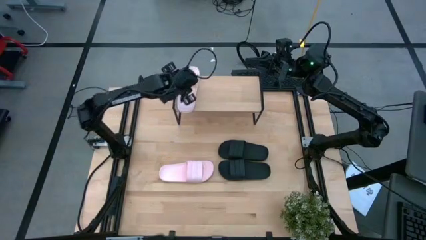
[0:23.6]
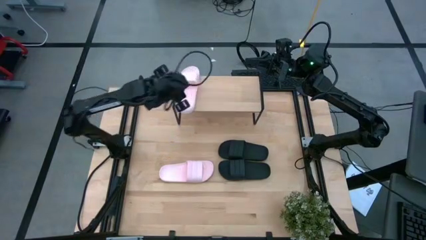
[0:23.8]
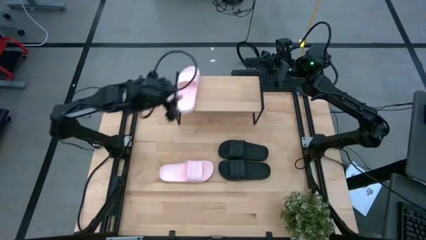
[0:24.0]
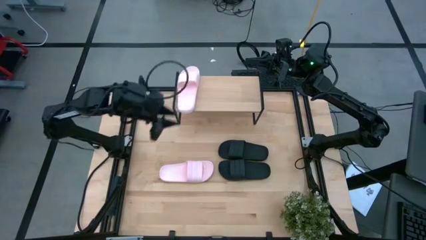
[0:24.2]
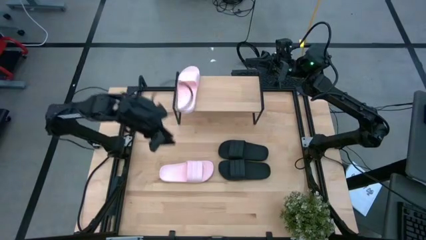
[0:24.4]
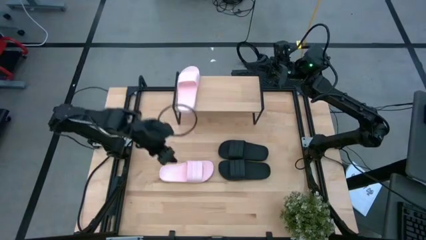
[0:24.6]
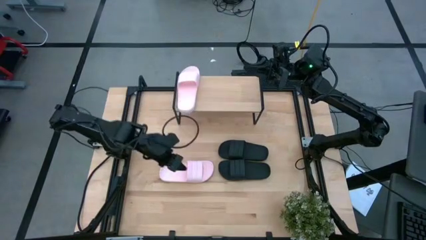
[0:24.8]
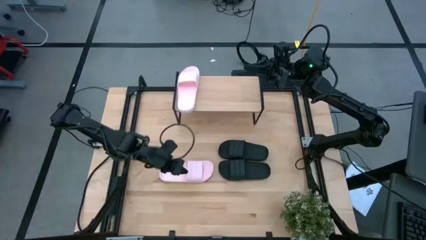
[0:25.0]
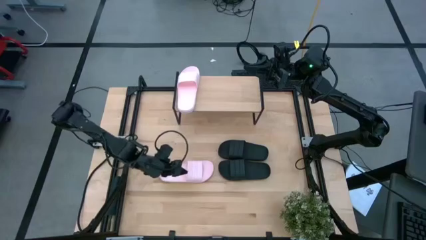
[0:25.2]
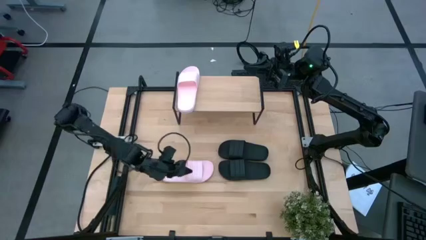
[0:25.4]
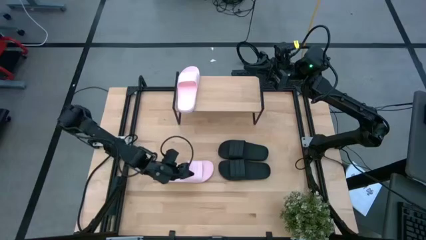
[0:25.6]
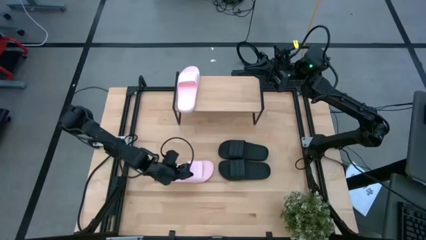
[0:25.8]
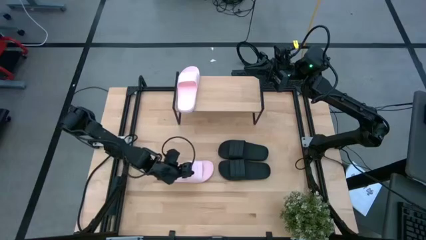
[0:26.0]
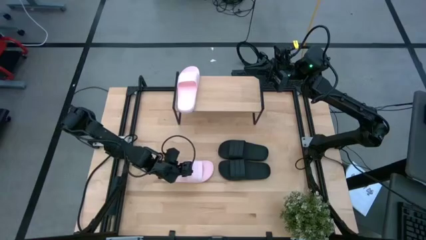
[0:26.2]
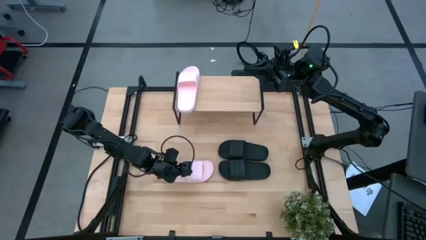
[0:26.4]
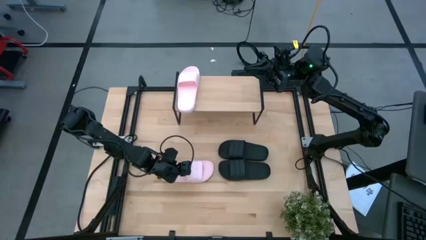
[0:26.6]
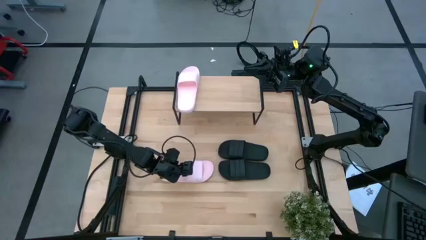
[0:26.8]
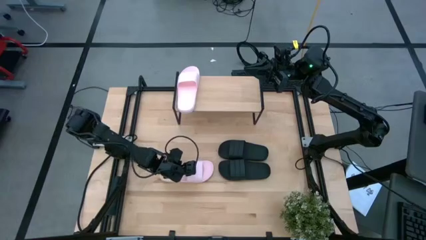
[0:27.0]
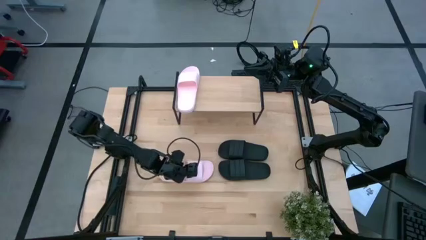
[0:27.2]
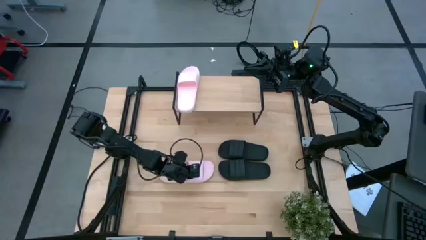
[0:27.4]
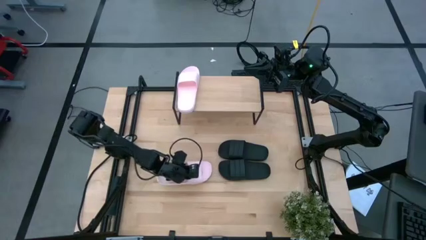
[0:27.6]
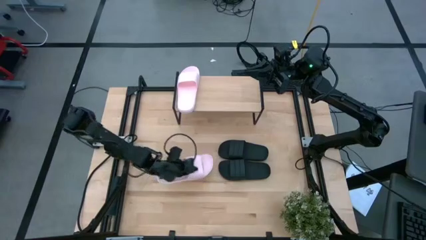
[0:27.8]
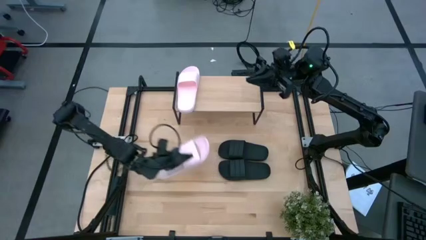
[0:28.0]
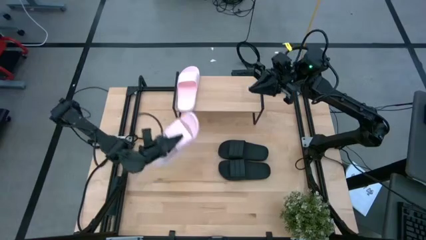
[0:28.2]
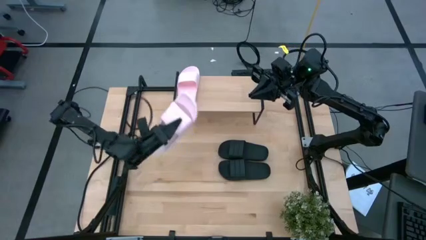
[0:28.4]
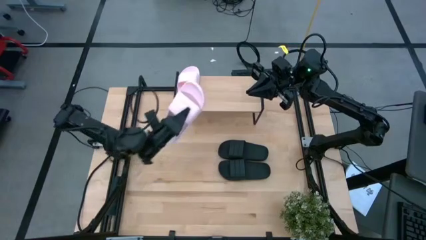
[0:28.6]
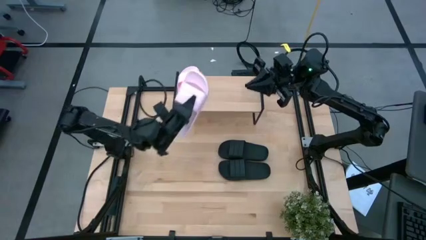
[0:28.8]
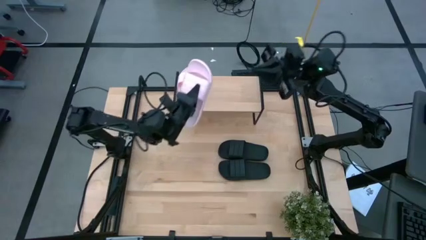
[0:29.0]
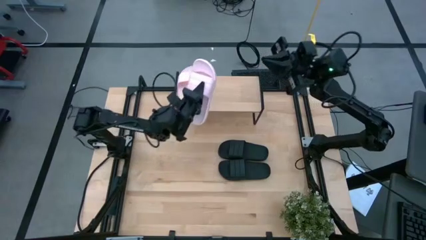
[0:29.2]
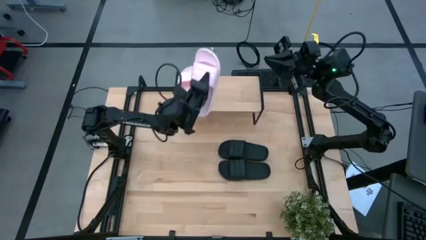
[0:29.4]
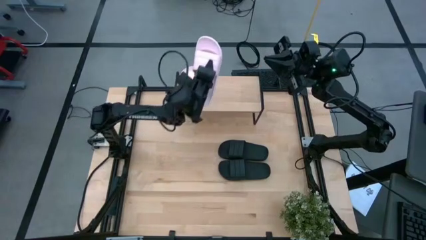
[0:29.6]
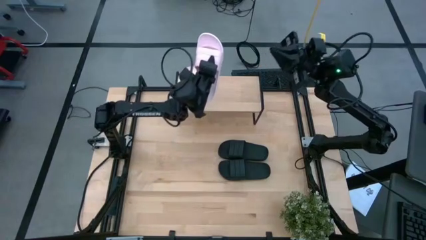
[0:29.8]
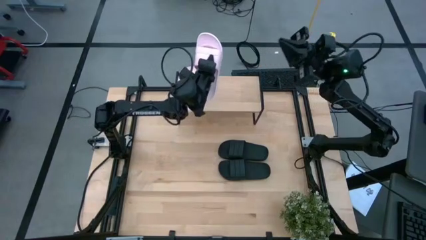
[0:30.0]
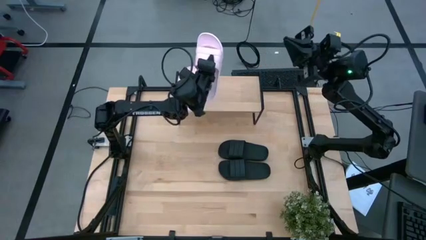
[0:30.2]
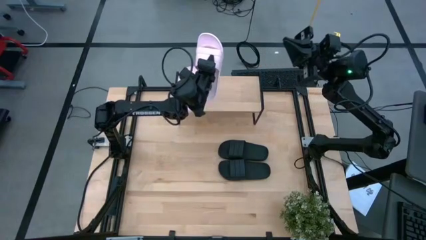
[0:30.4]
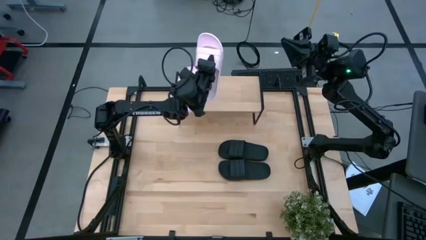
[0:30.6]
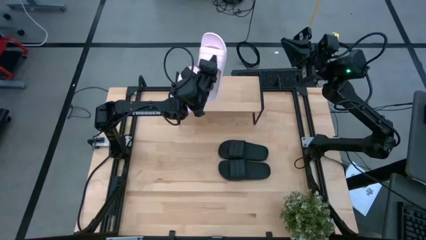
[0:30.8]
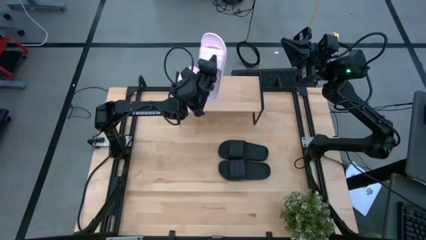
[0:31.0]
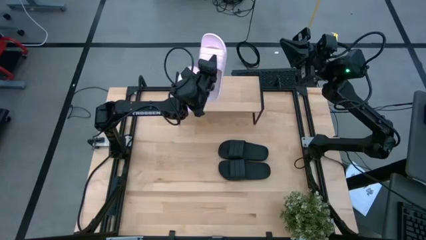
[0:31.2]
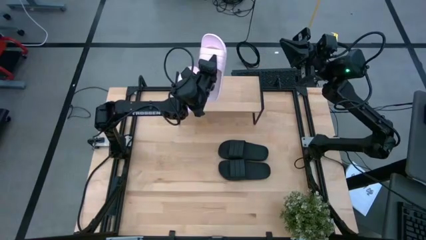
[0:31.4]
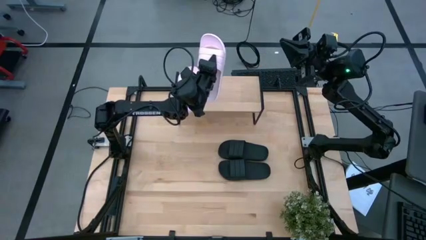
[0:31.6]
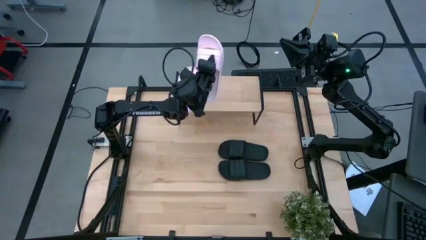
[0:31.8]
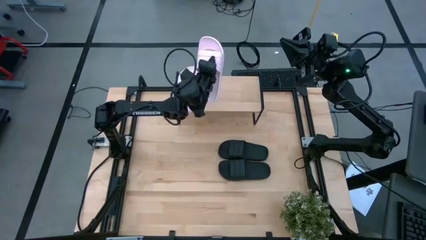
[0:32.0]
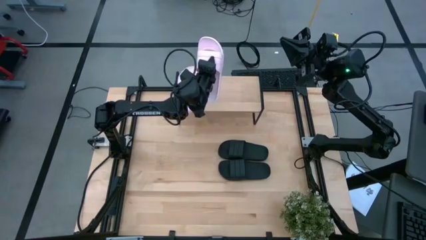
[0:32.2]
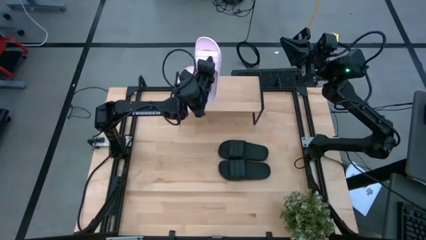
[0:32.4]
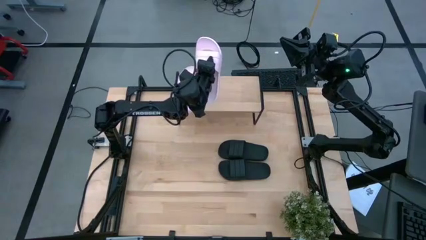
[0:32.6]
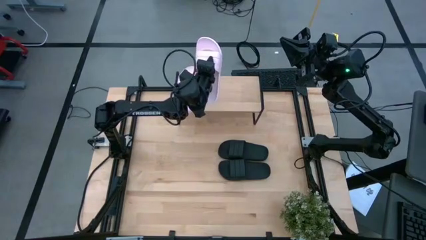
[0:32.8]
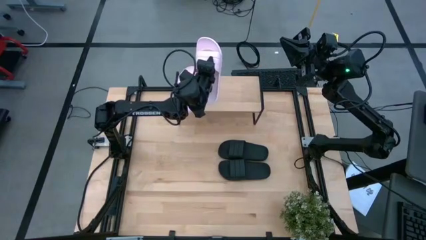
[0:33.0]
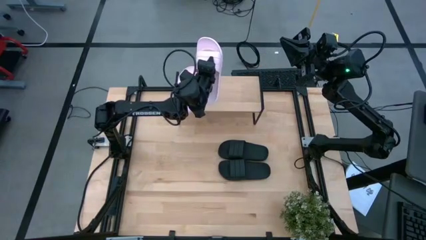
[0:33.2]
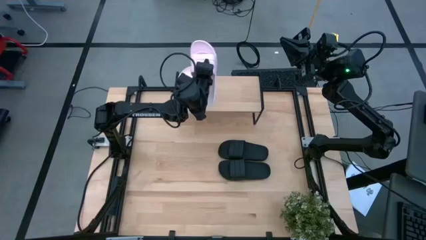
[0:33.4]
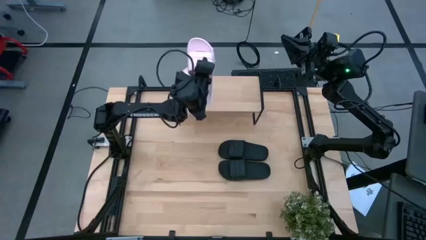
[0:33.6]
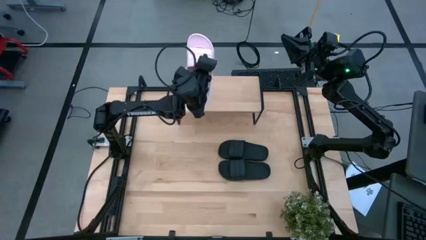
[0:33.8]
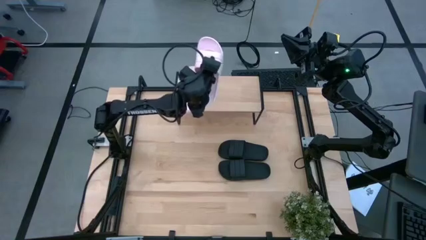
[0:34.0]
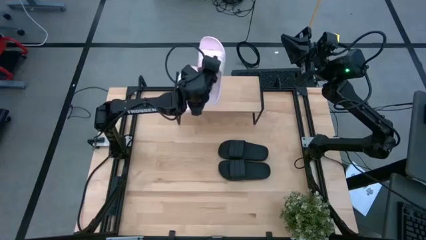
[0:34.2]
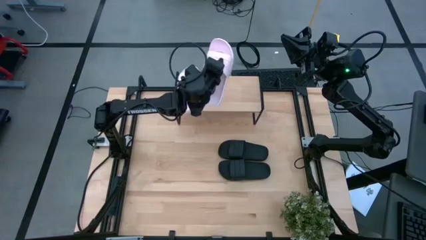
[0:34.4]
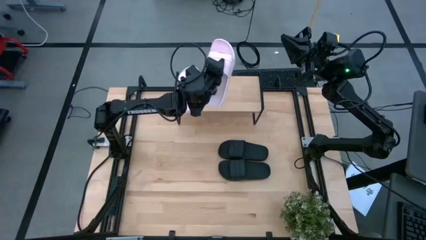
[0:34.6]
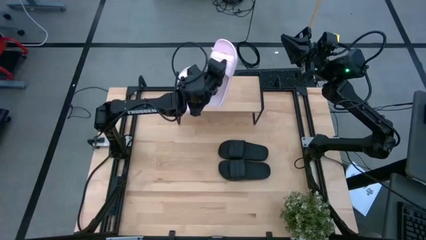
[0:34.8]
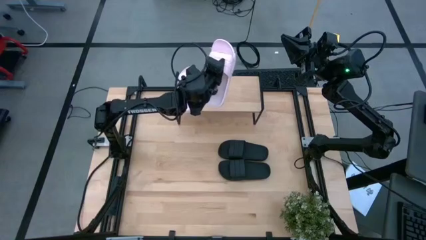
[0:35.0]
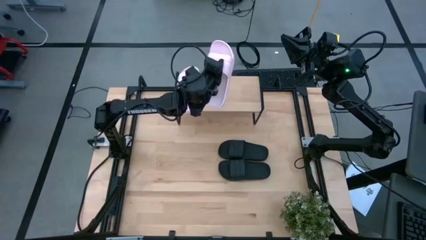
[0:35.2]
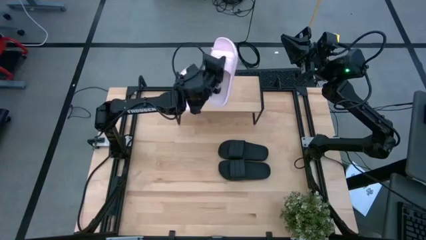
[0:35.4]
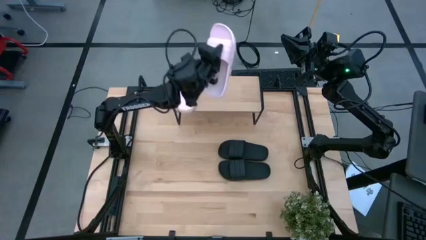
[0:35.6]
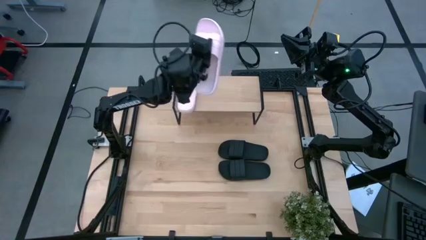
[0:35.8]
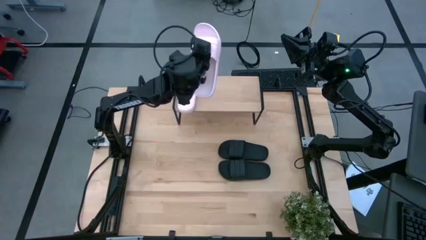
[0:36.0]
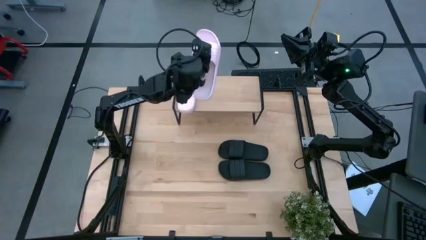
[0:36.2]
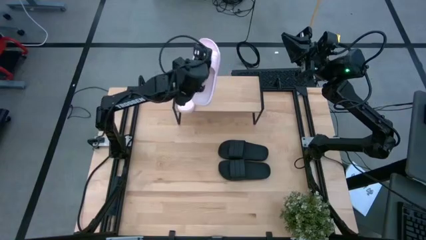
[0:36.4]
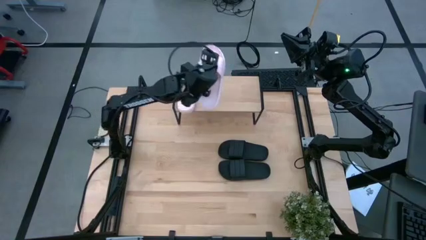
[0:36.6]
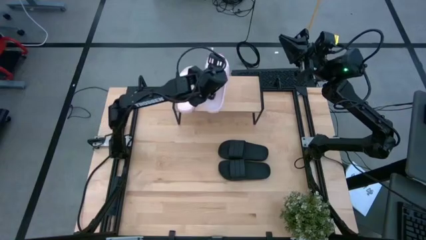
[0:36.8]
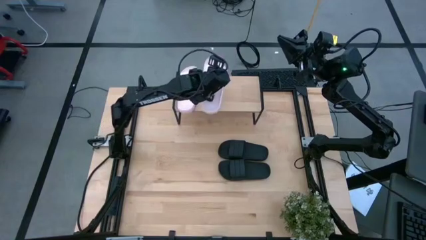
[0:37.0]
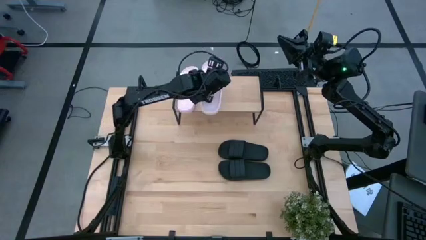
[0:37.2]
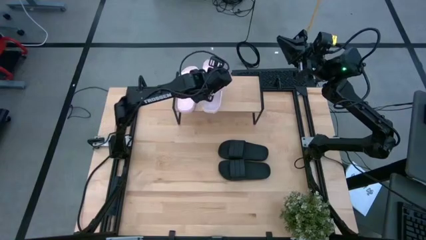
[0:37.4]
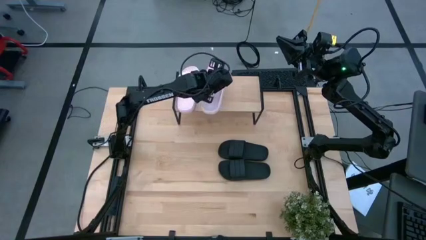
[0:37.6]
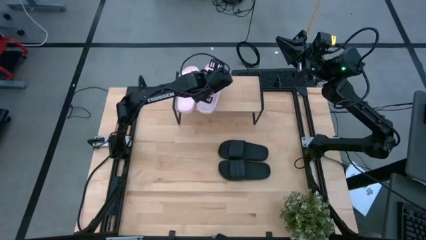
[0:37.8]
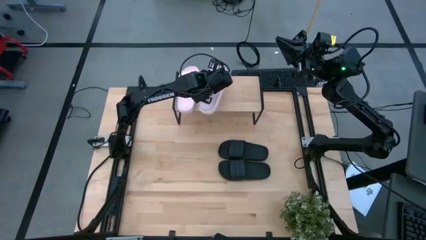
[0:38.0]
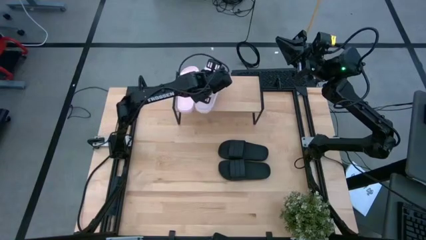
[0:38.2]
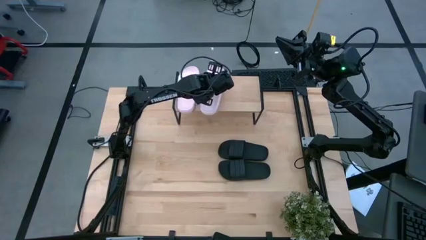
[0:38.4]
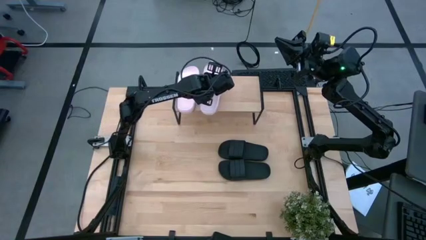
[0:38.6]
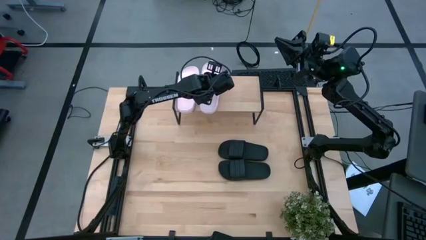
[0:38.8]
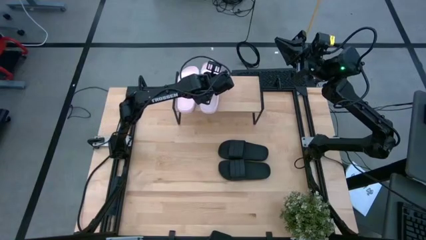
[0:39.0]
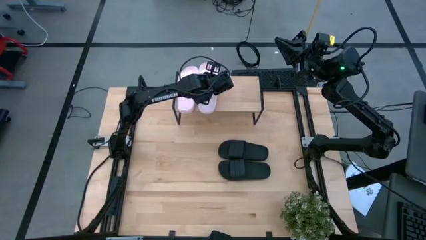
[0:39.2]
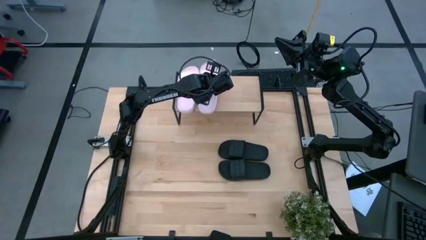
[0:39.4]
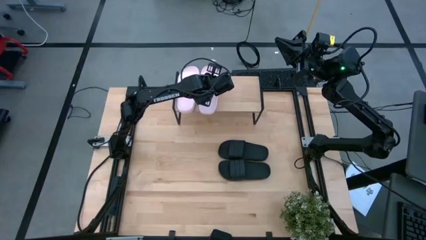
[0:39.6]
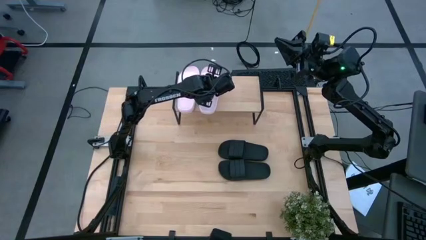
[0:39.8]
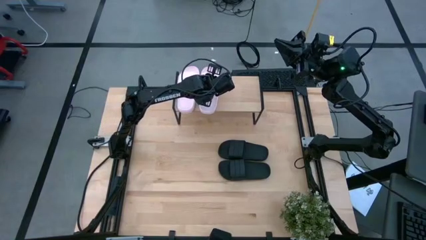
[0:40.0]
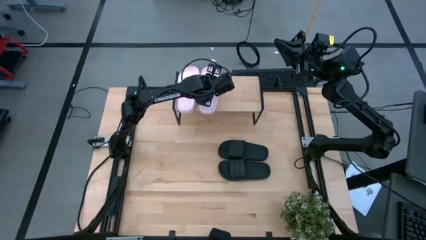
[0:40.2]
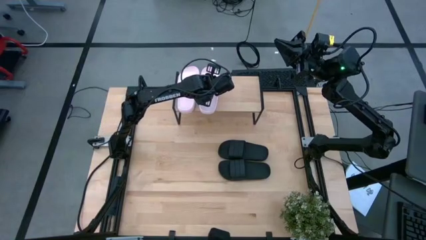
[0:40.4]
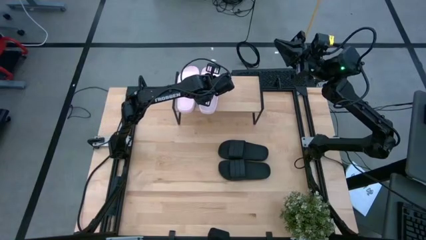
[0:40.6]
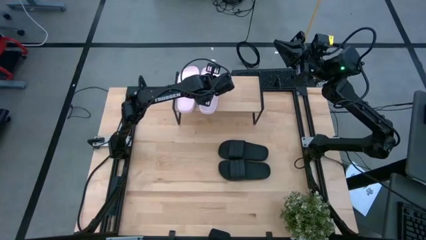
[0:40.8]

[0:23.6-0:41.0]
Task: Pick and place slides into the shelf
Put the pink slides on the shelf
